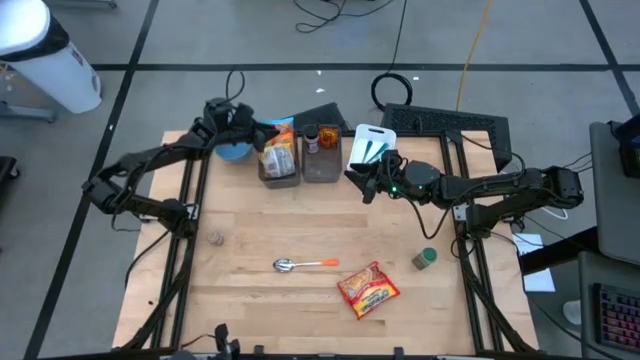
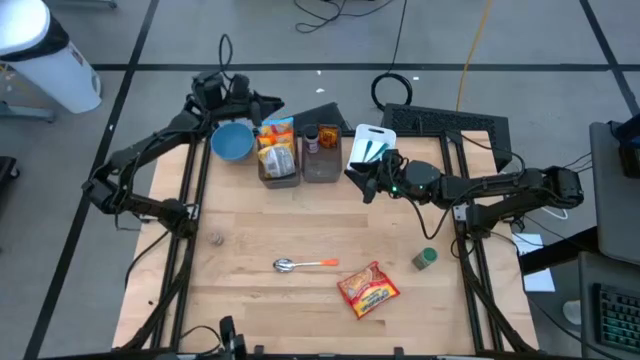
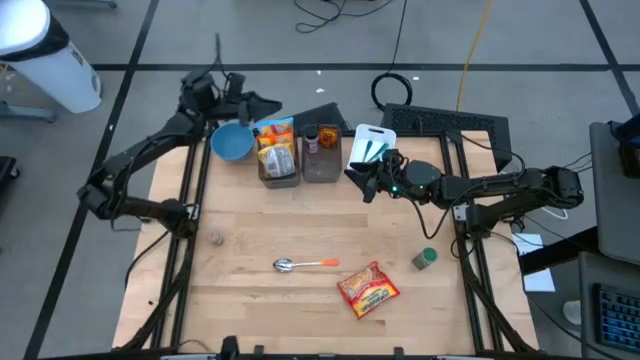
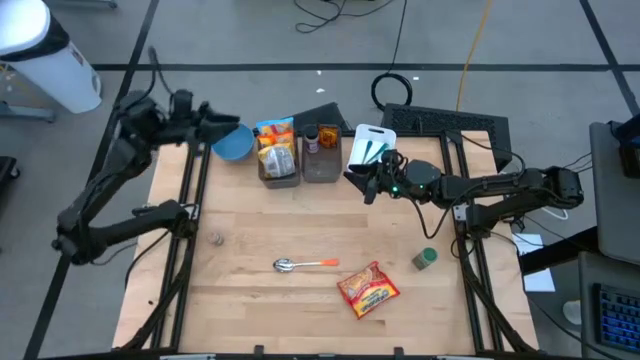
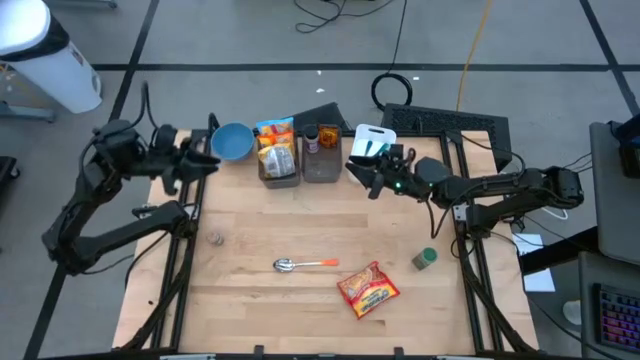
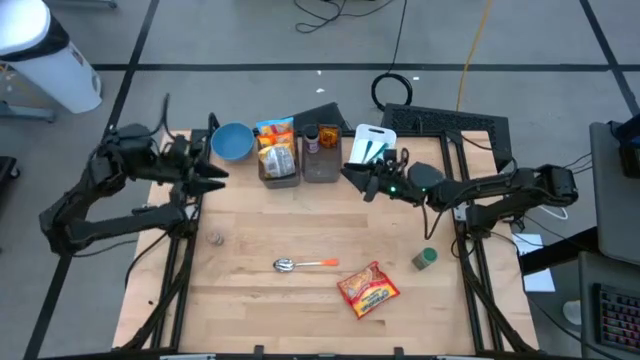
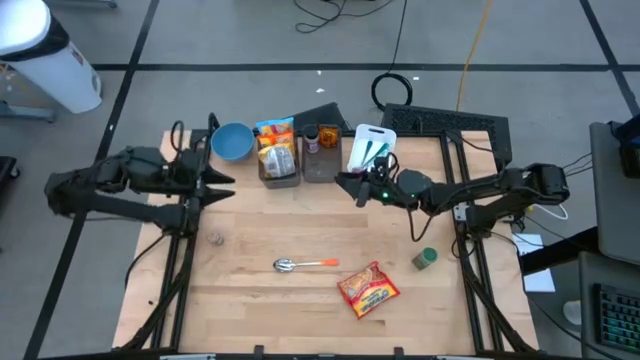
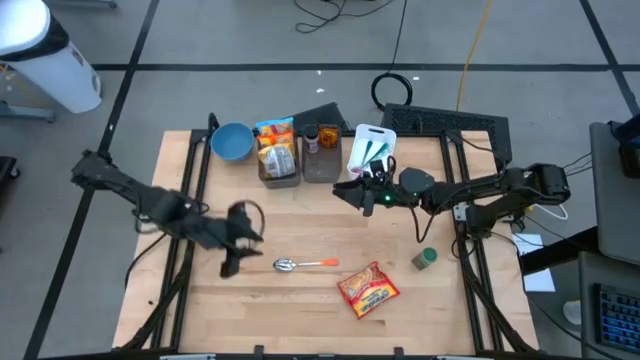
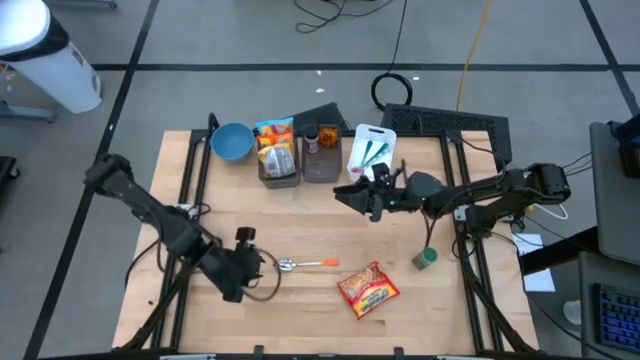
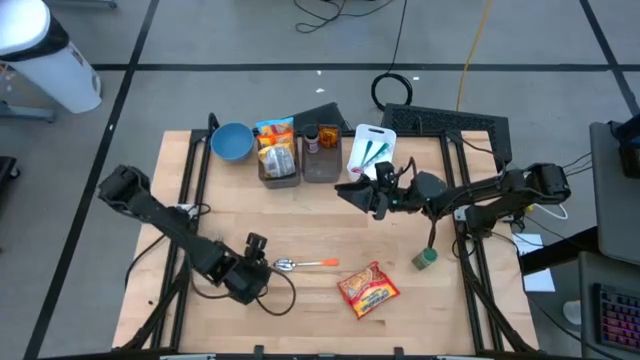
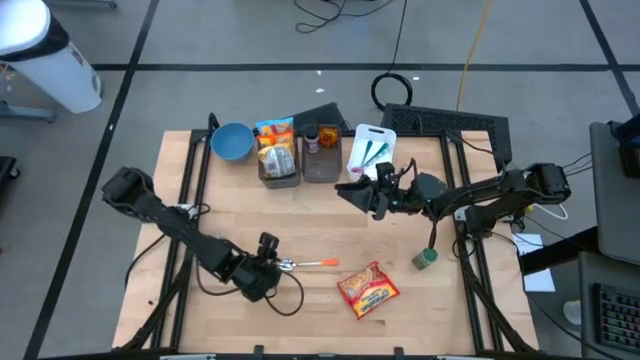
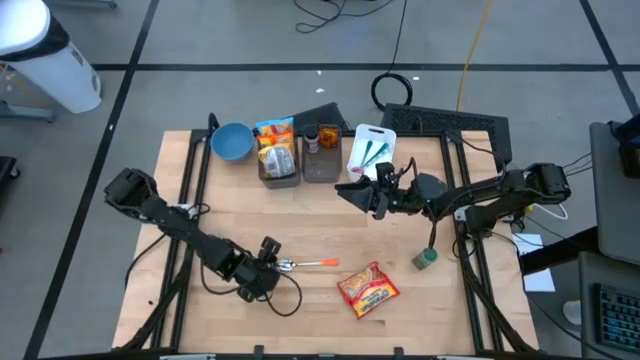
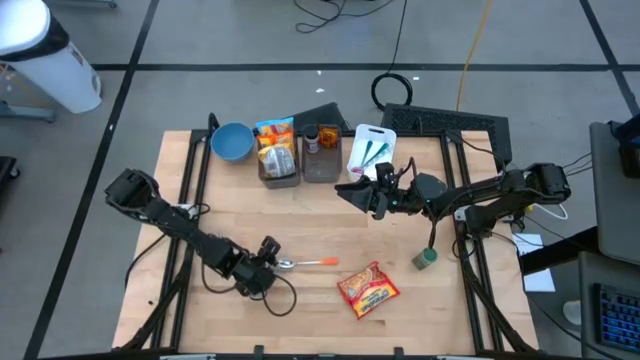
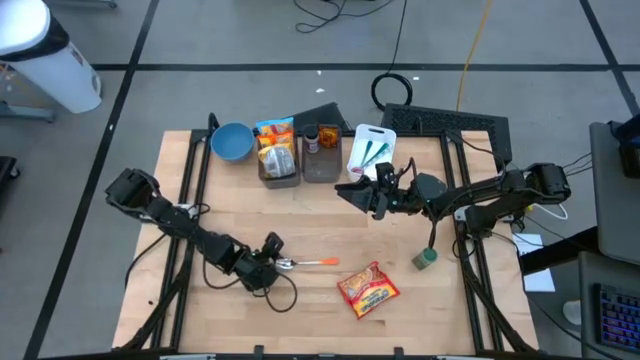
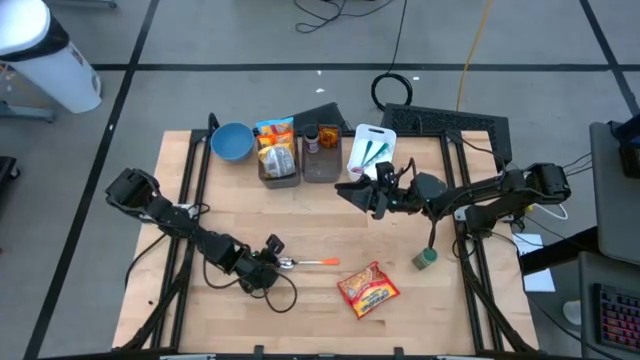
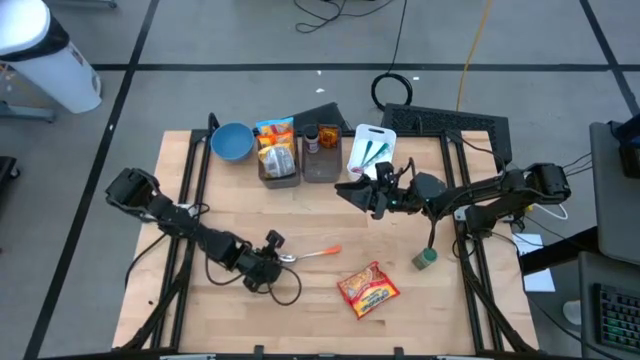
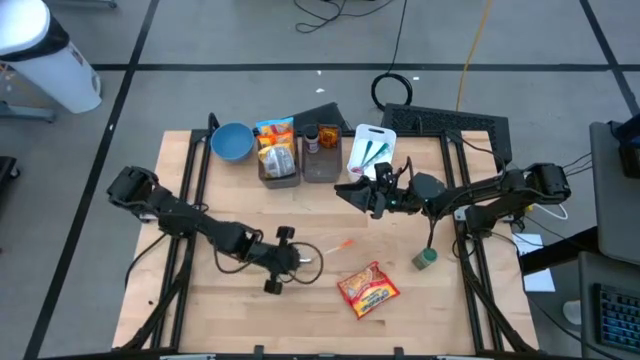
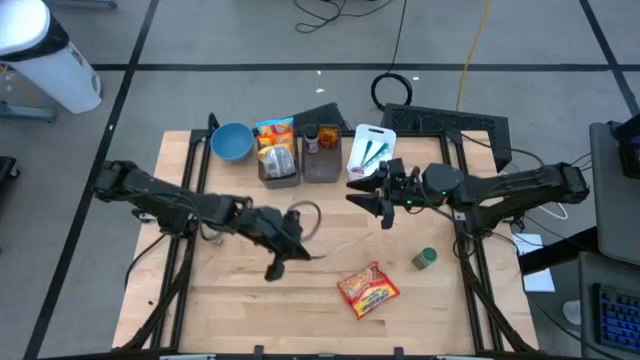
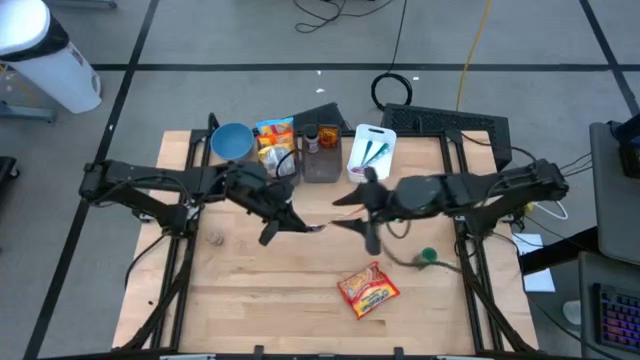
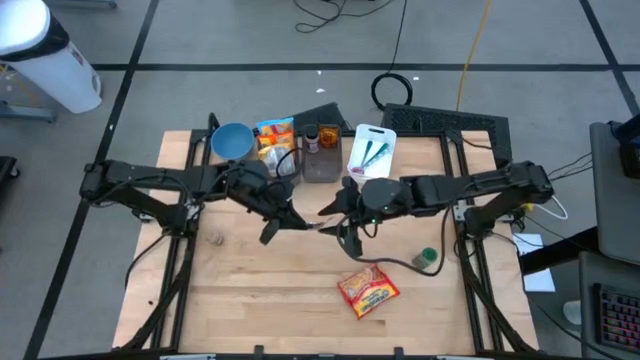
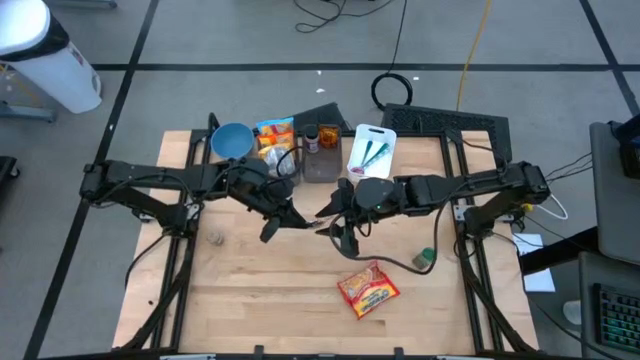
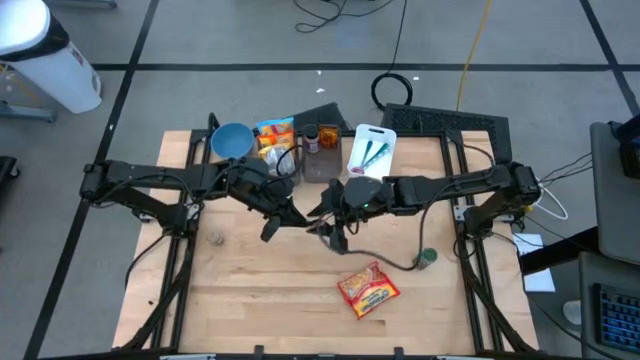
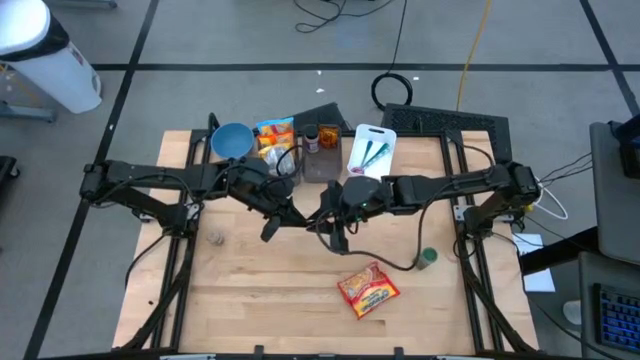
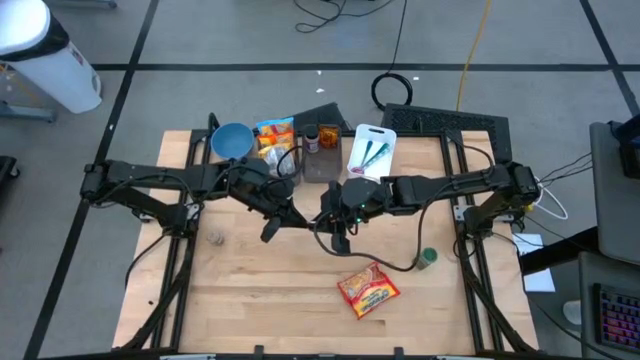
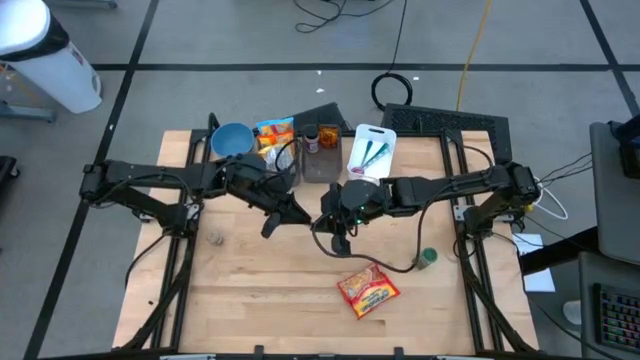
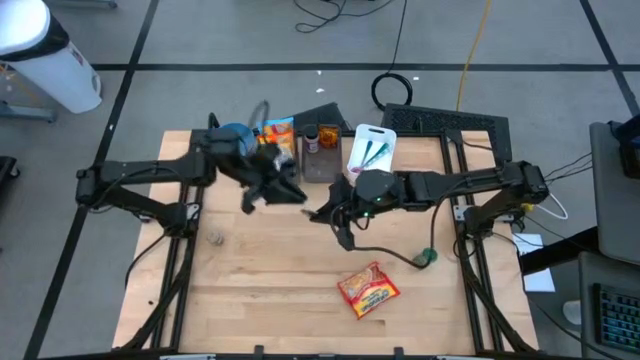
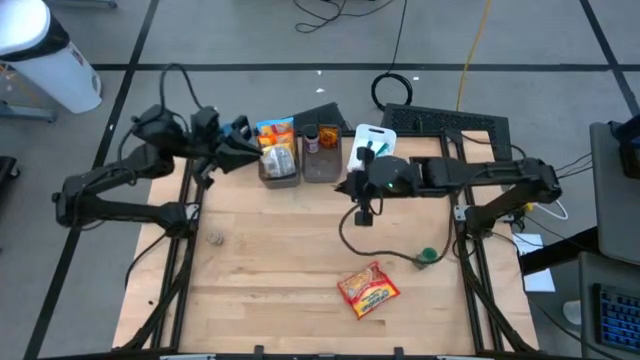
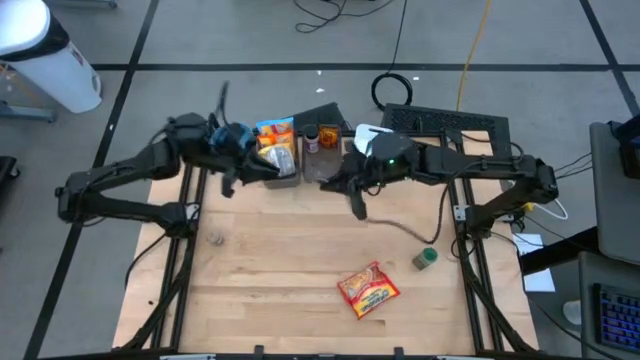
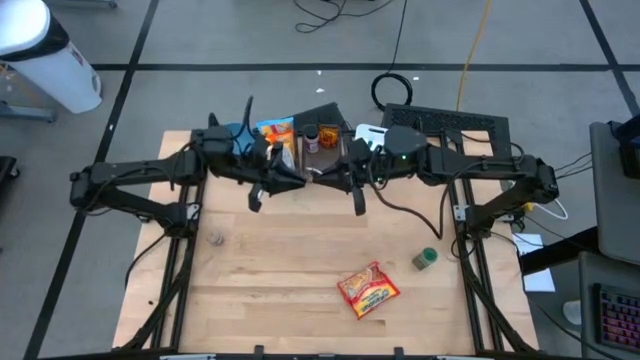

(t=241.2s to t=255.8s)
Task: Pick & Place Food Item
Put the orange spoon into the white bin

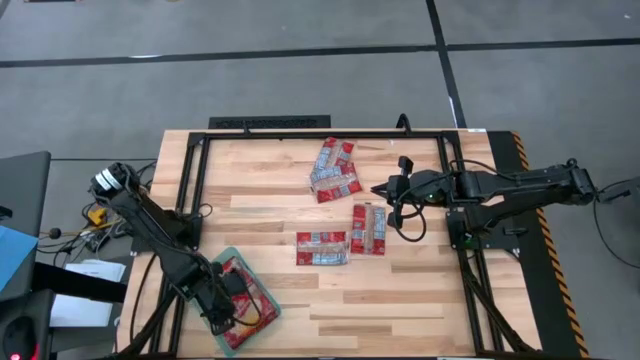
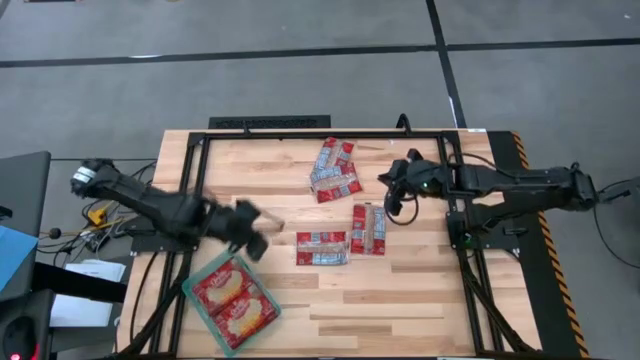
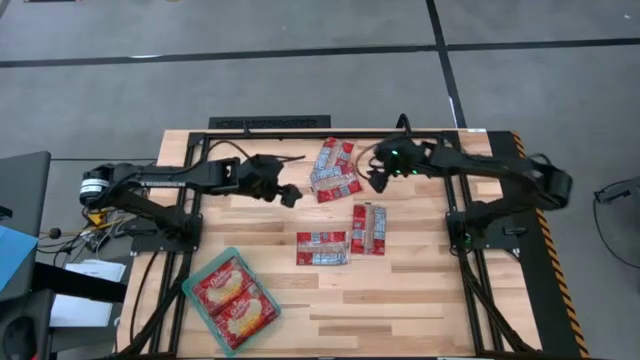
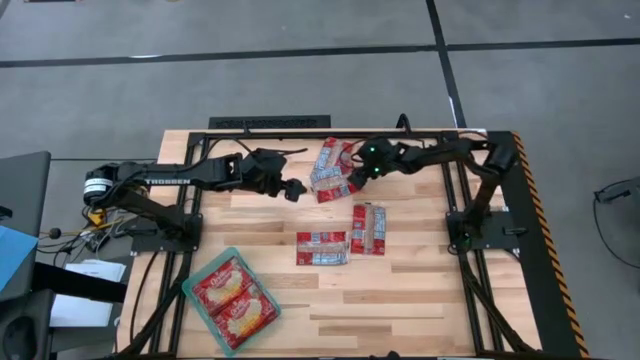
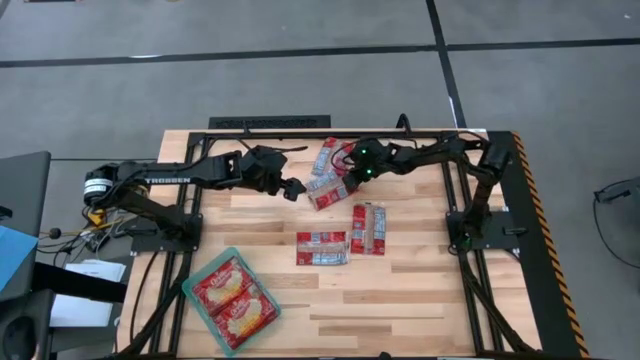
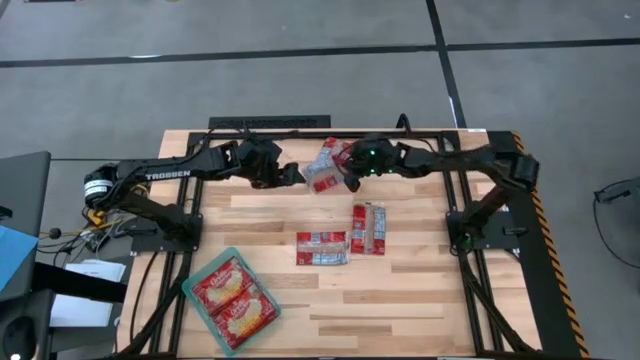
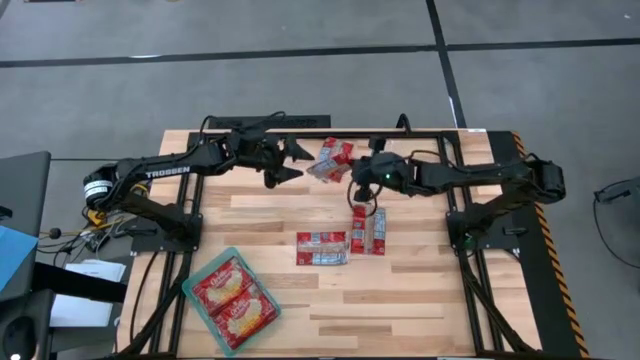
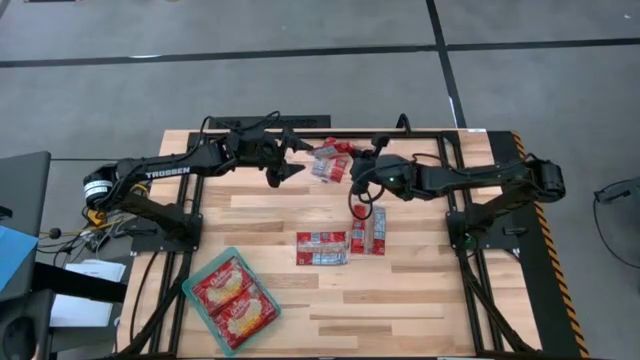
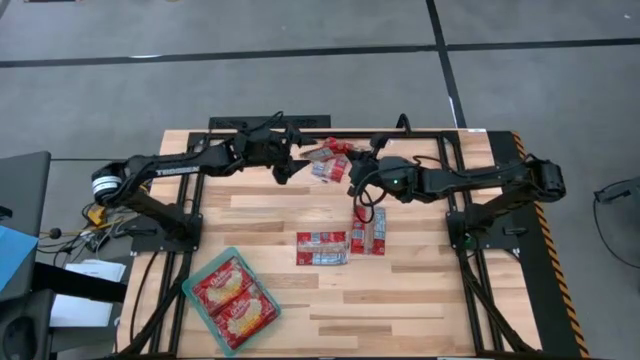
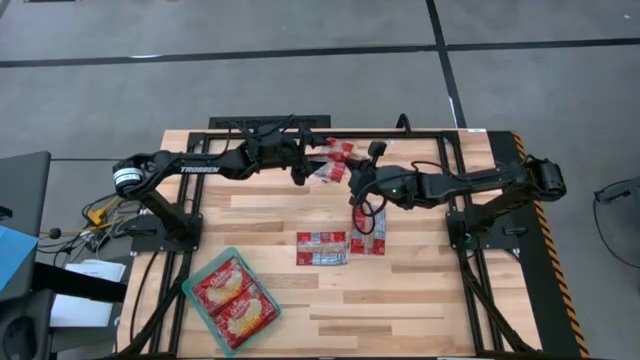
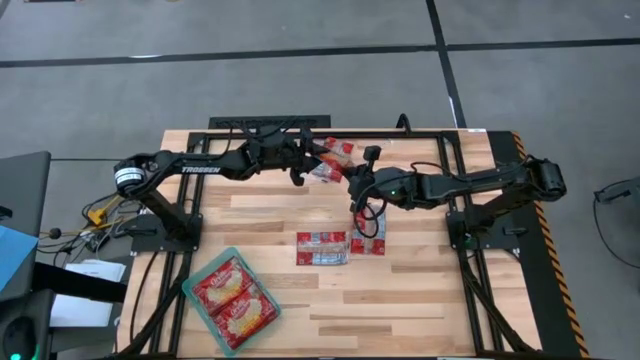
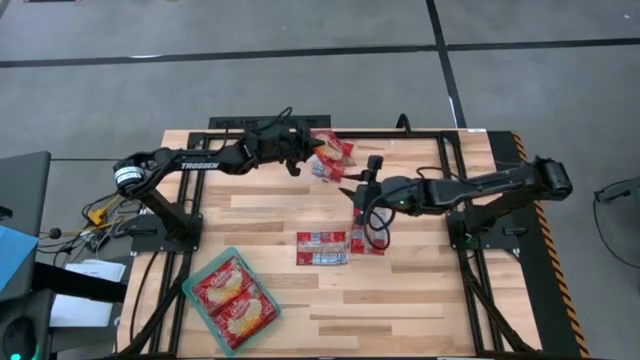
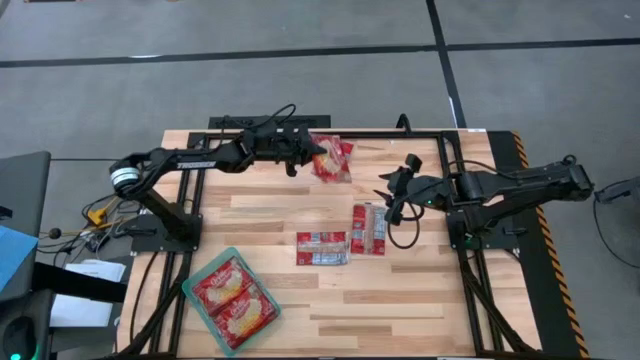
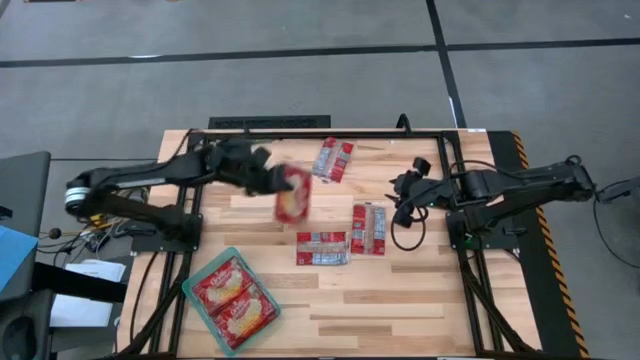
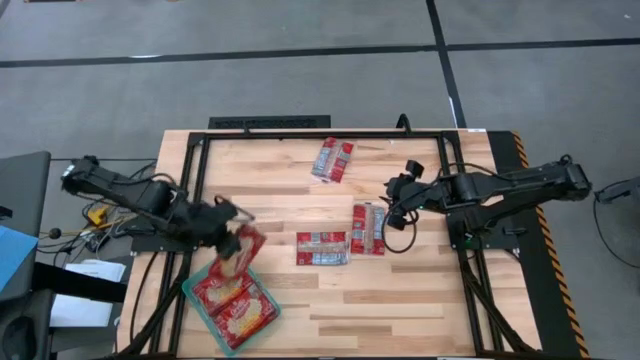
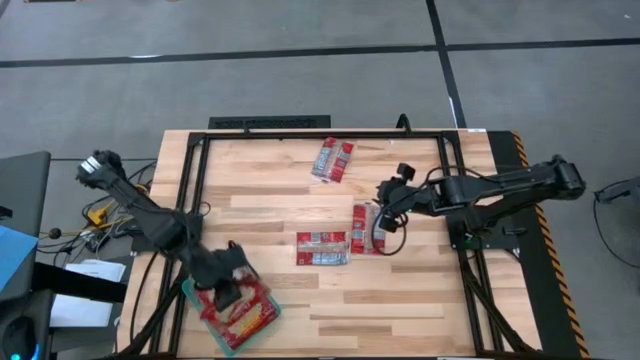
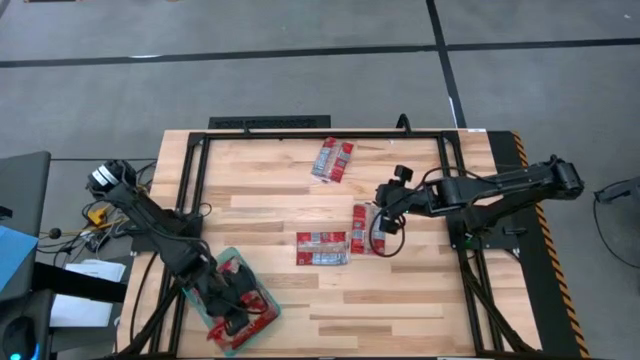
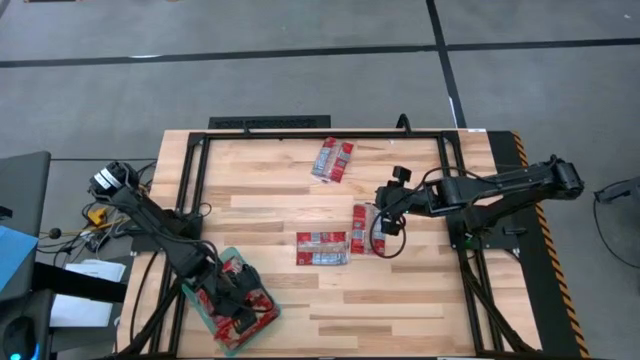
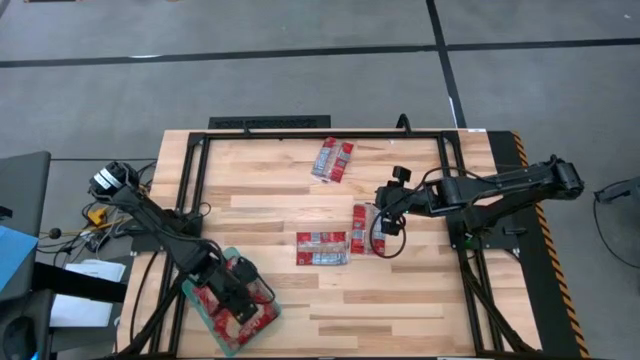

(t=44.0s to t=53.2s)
Task: Sort popcorn bags into baskets
Put the red popcorn bag into the green bin
